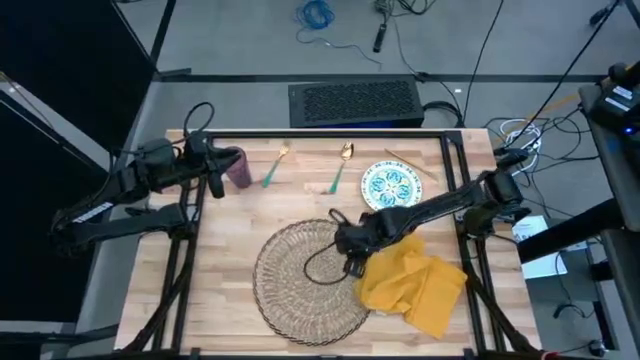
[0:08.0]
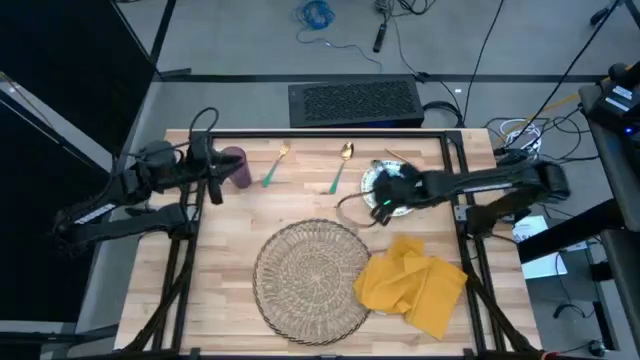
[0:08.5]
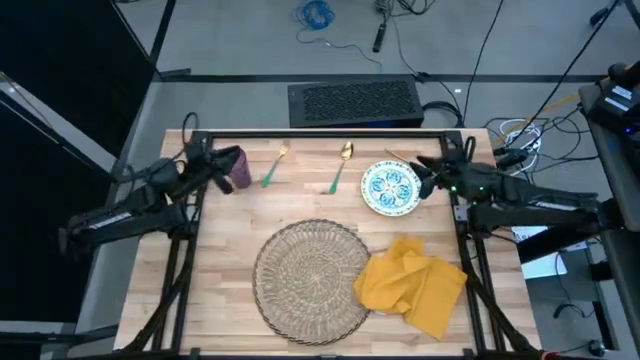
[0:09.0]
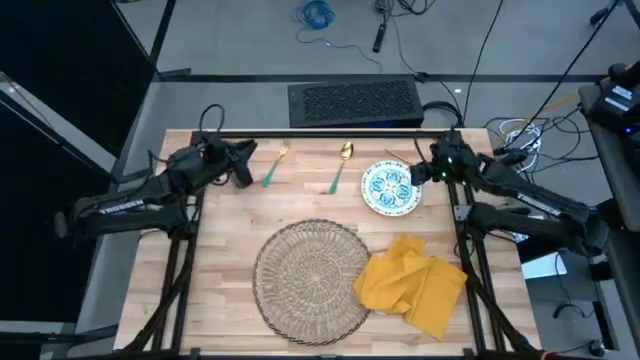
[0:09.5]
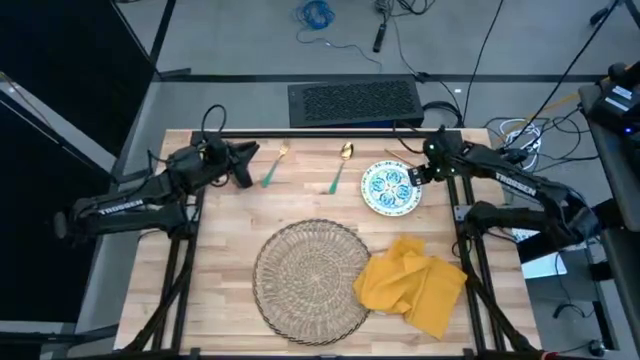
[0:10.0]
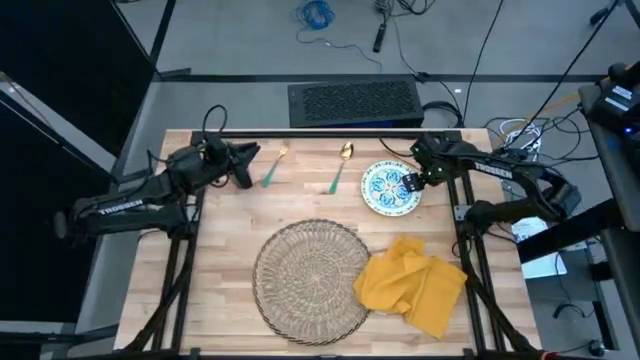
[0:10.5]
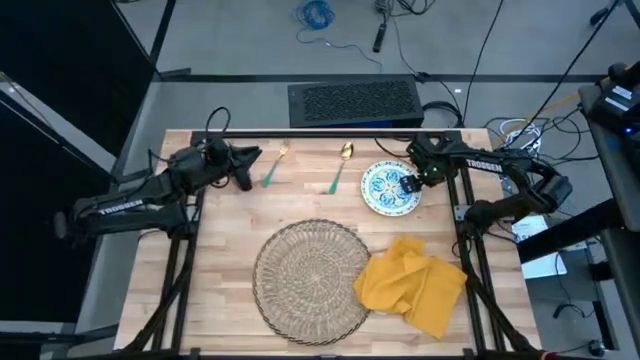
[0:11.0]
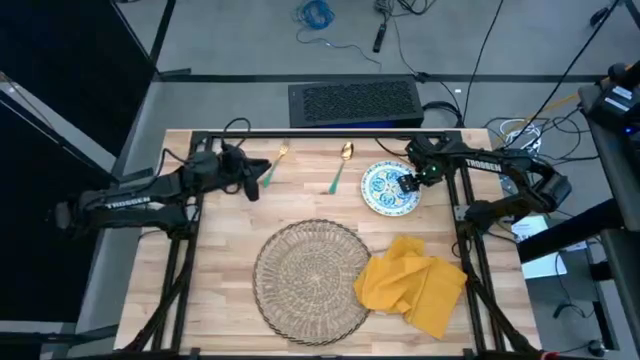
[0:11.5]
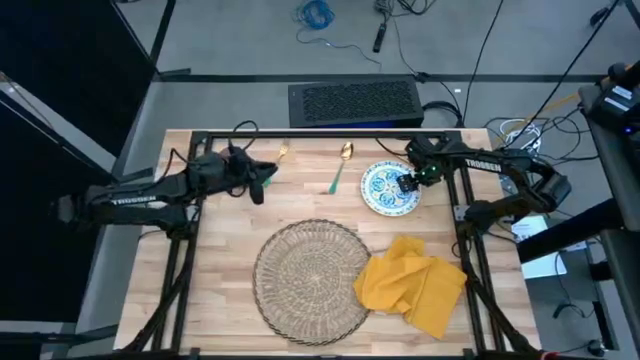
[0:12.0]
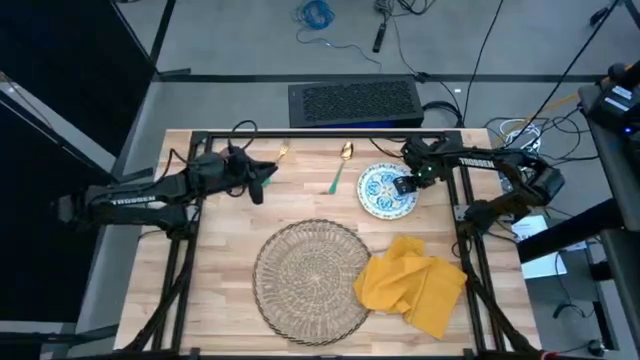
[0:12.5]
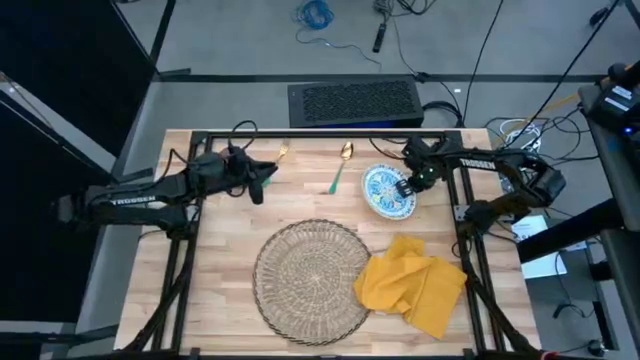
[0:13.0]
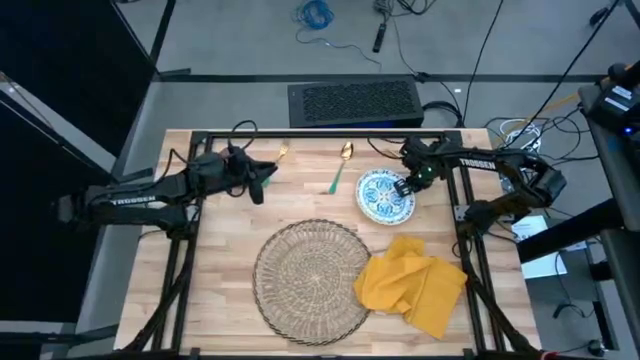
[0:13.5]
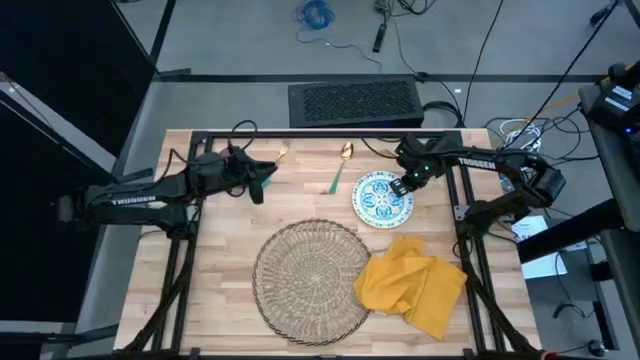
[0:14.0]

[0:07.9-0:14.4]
Task: Set table place
Put the white patterned plate to the center of the brown placemat

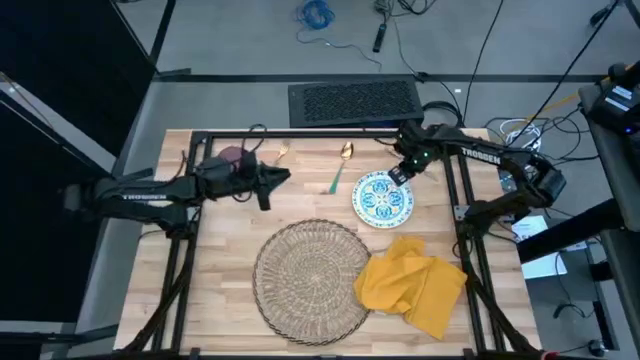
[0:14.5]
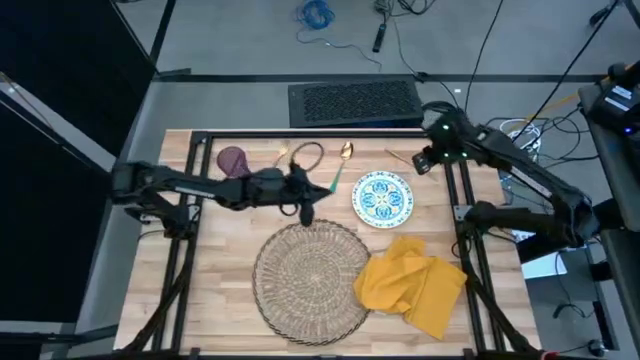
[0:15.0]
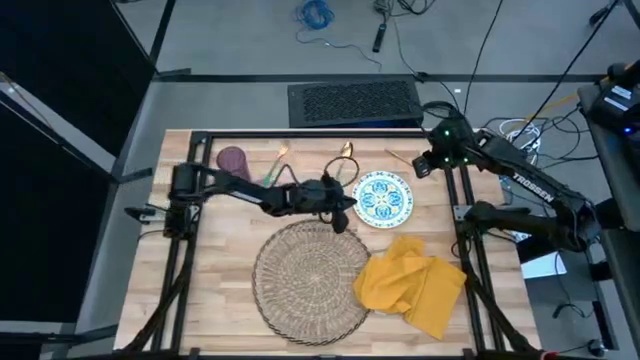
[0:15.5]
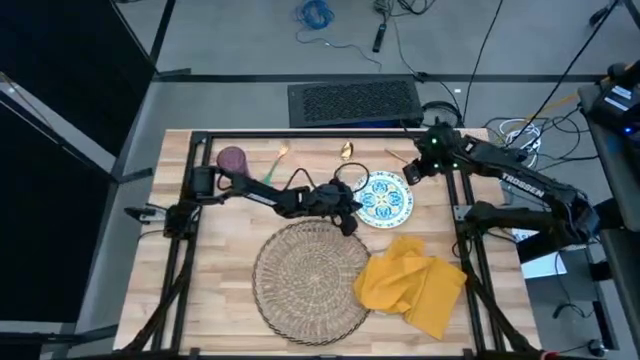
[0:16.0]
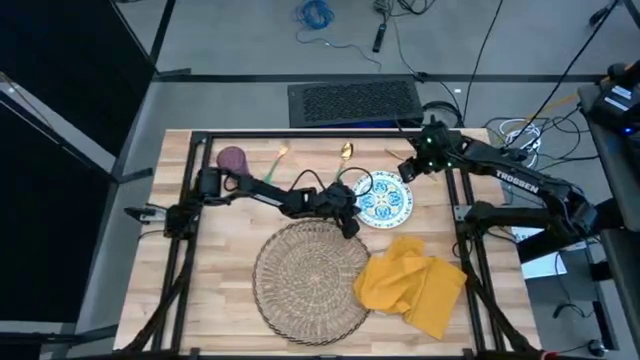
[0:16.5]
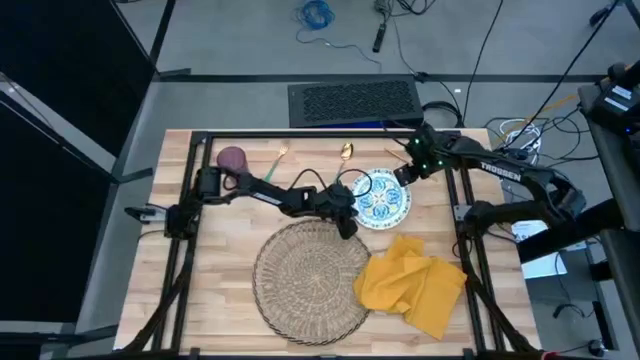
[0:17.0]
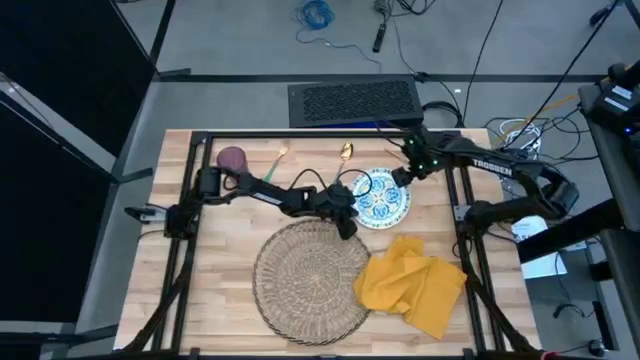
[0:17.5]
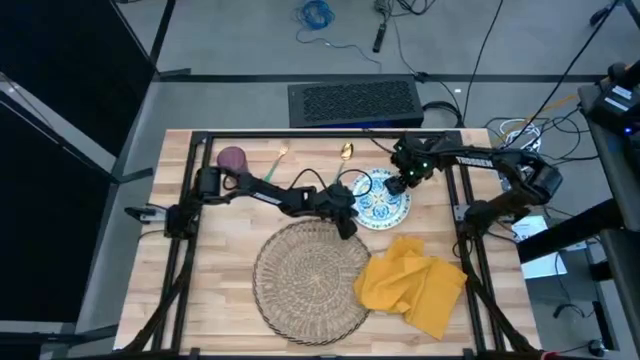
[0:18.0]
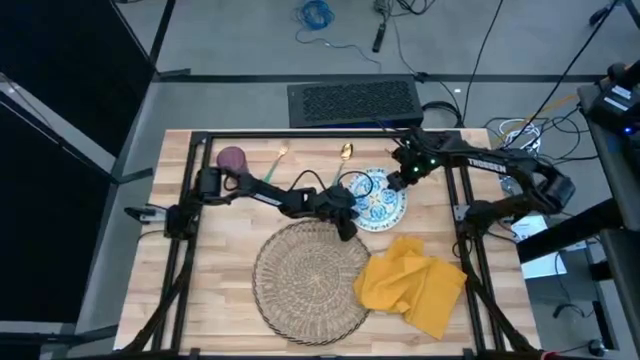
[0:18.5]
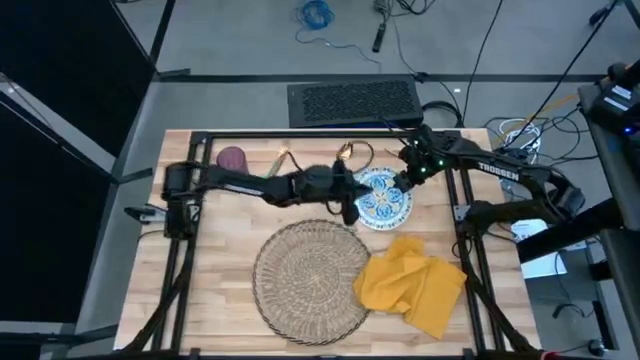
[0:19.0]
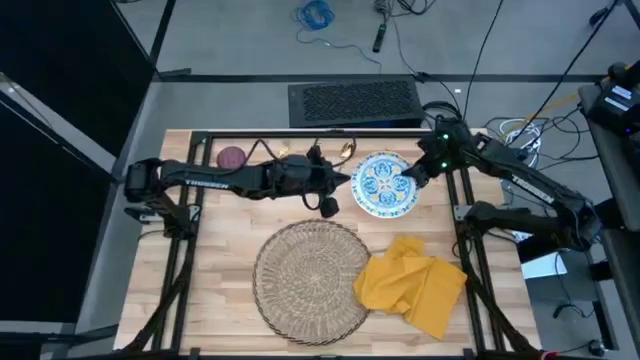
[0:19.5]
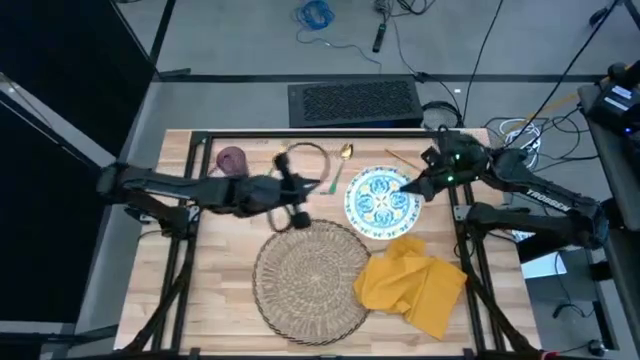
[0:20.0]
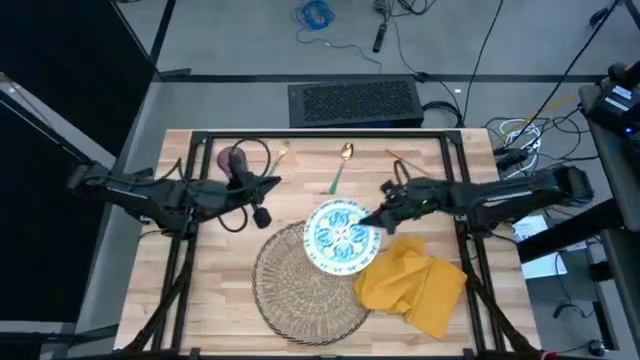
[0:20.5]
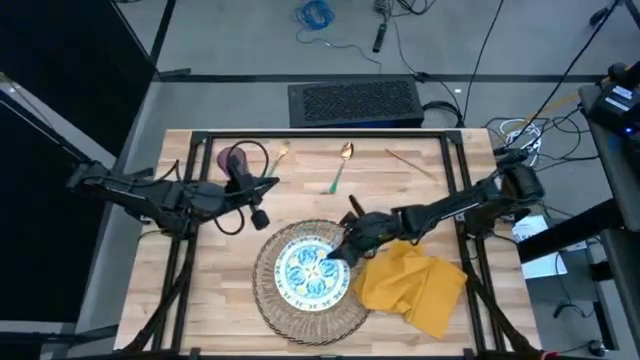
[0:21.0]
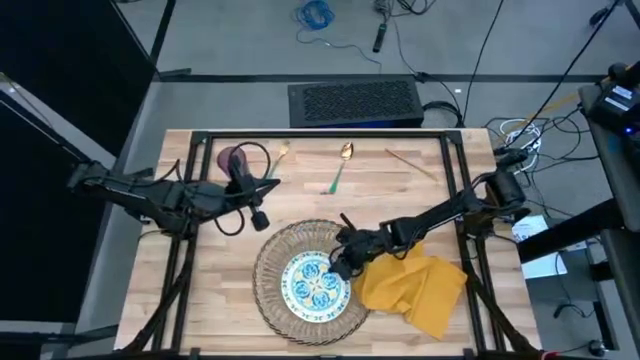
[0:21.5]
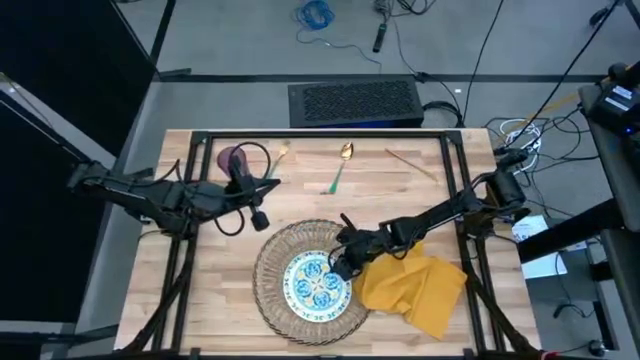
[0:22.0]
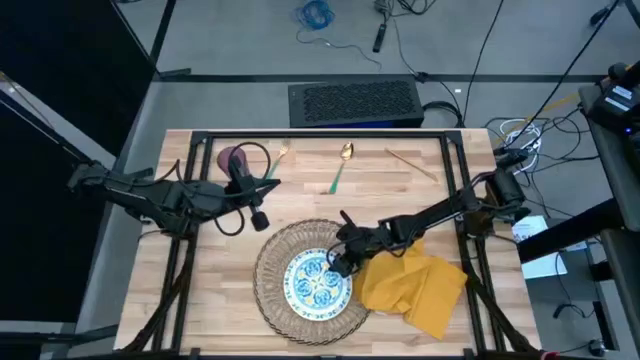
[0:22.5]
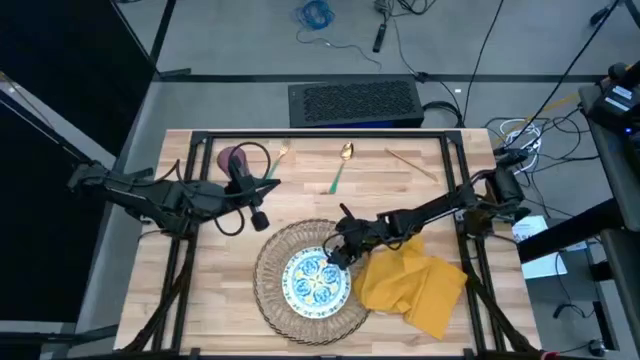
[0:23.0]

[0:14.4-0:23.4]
Put the white patterned plate to the center of the brown placemat

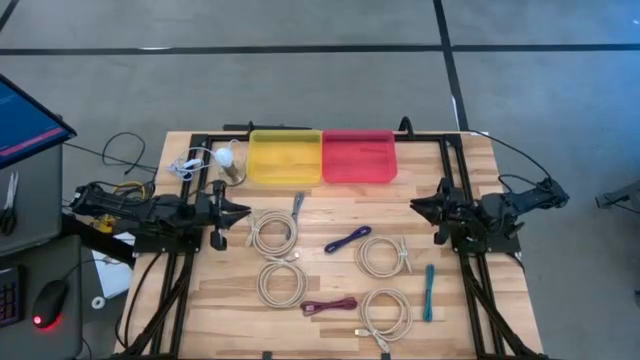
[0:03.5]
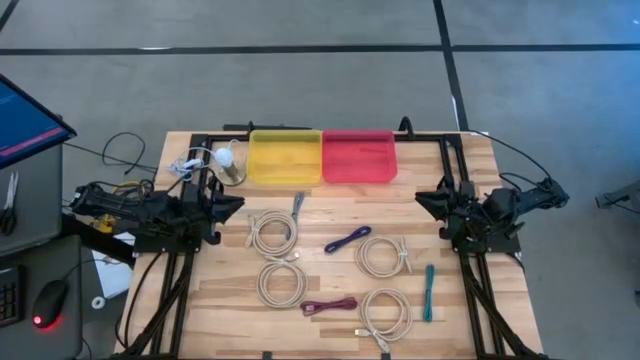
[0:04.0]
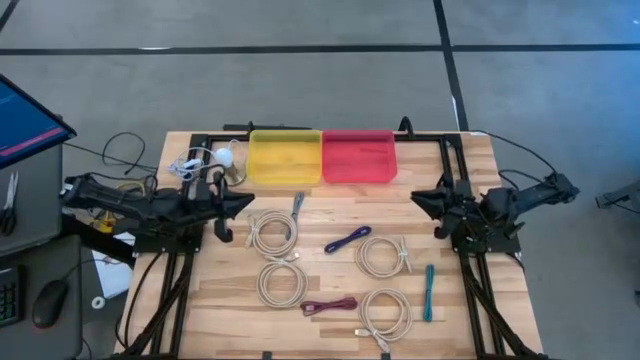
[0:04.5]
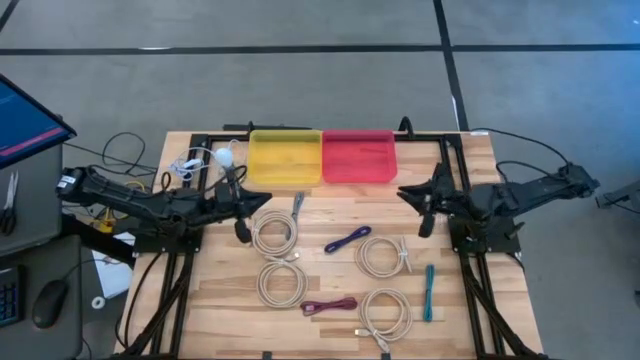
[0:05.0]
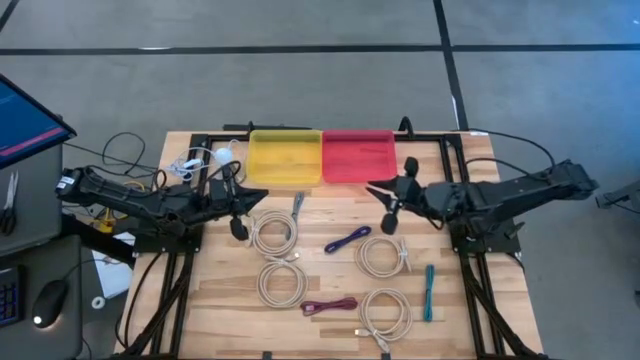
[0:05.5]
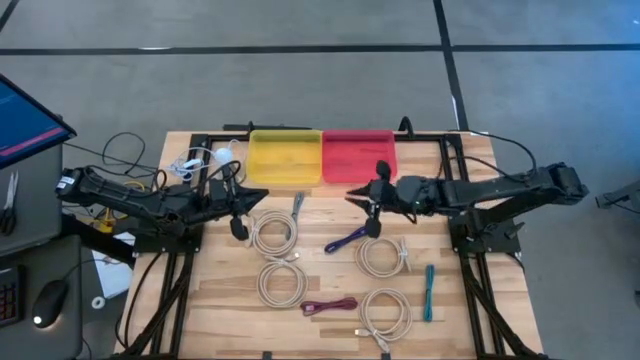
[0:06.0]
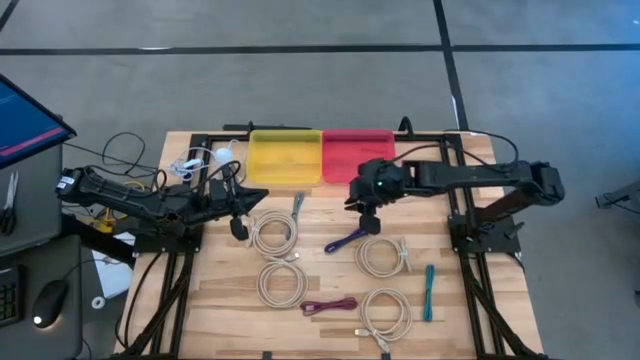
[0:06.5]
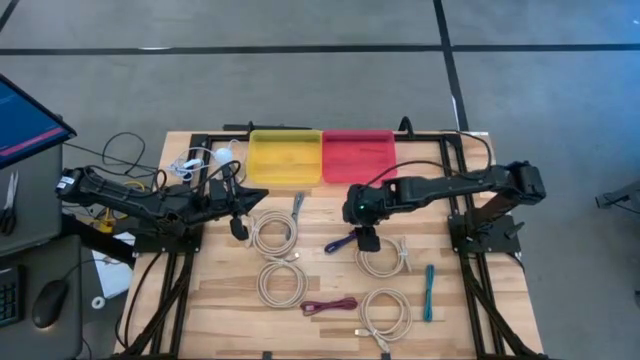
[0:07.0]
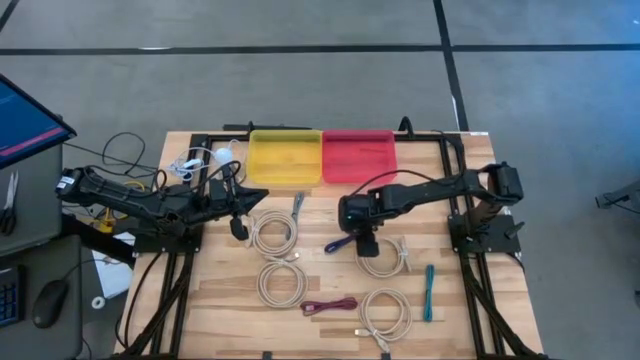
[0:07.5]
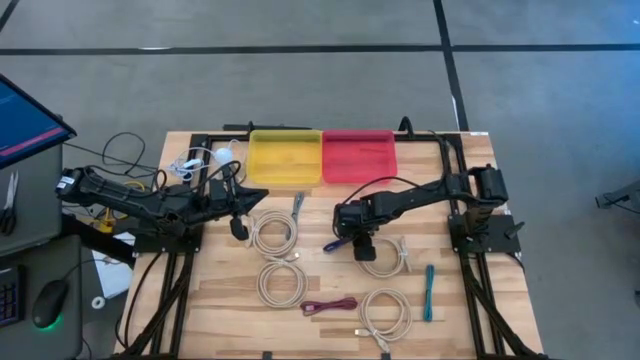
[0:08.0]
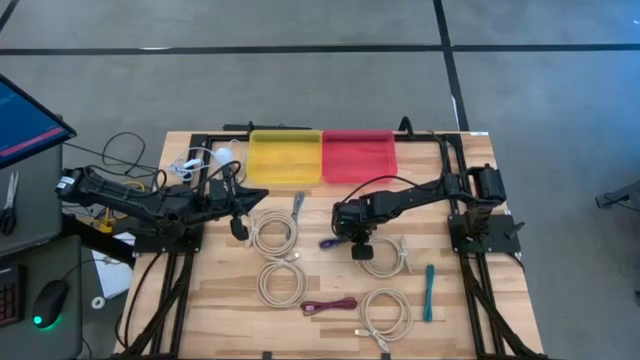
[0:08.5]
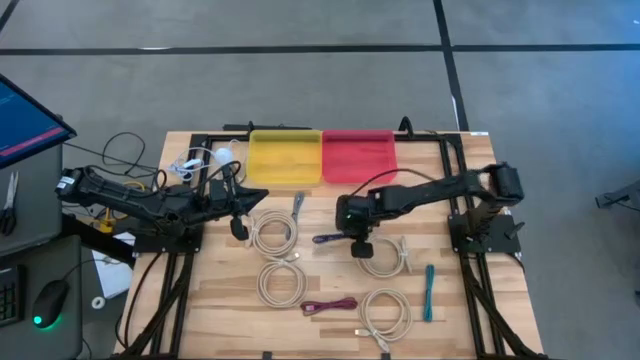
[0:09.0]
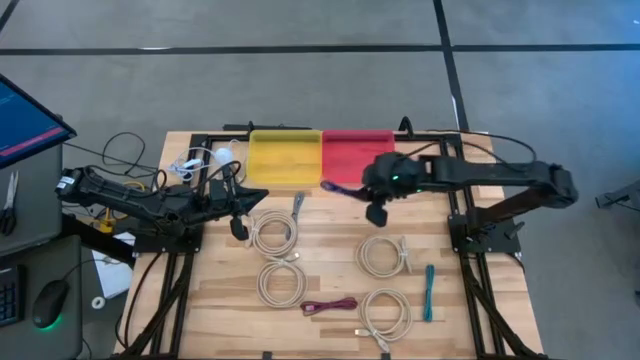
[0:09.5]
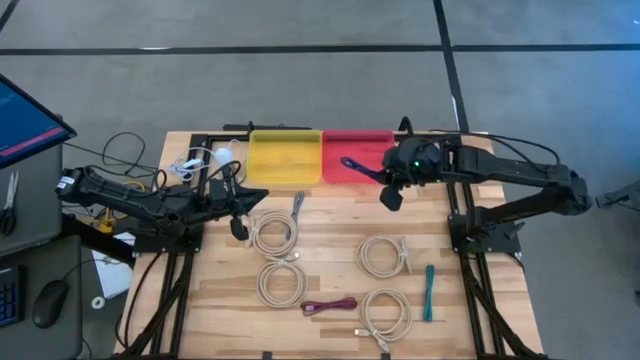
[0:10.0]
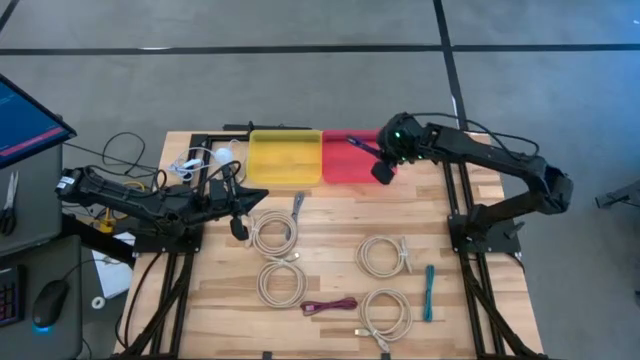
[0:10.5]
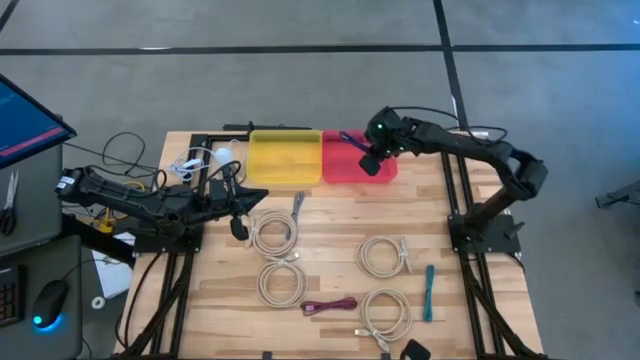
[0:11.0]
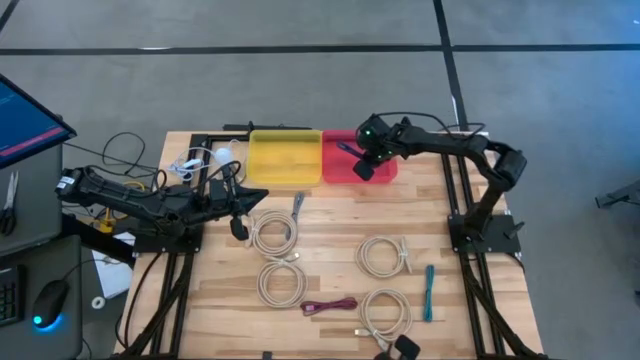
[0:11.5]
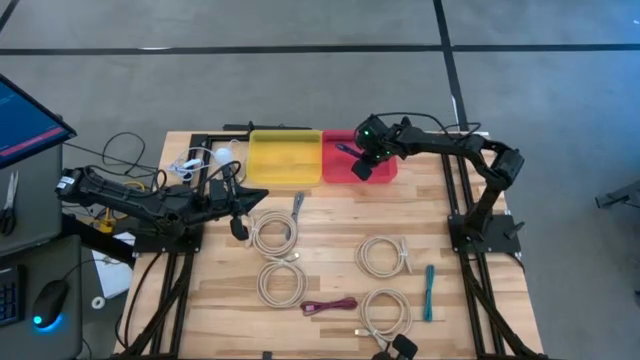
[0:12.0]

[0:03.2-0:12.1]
Task: Pick & Place USB Port
Put the small black and blue charger cable into the red bin
